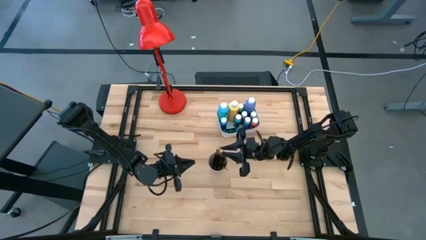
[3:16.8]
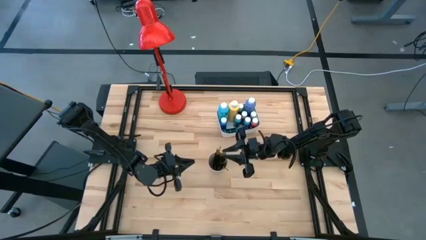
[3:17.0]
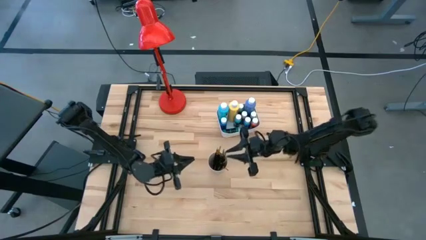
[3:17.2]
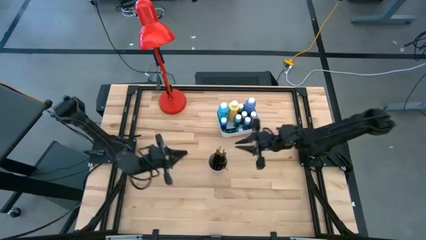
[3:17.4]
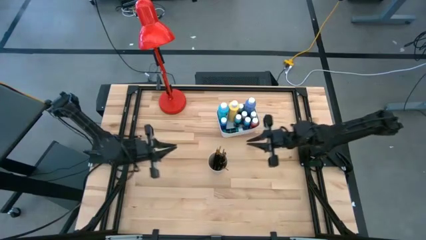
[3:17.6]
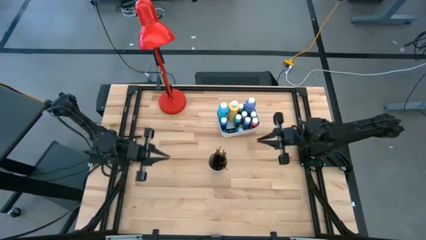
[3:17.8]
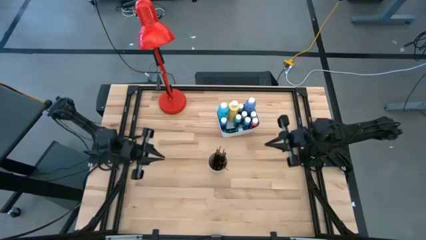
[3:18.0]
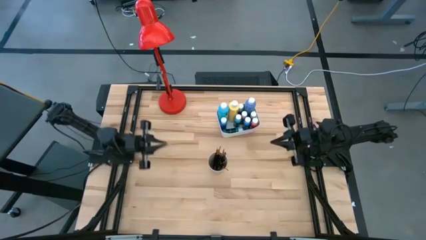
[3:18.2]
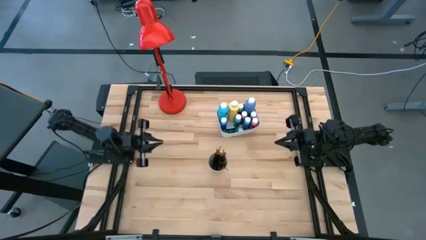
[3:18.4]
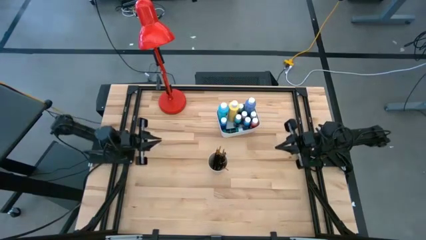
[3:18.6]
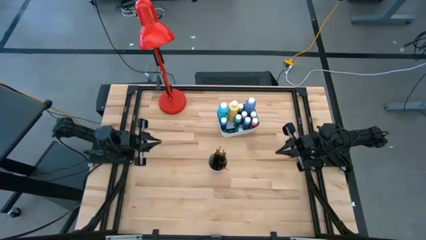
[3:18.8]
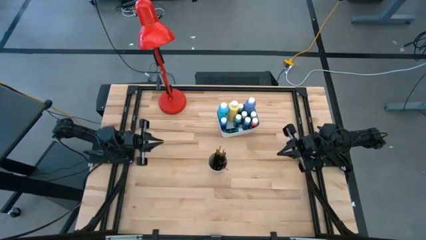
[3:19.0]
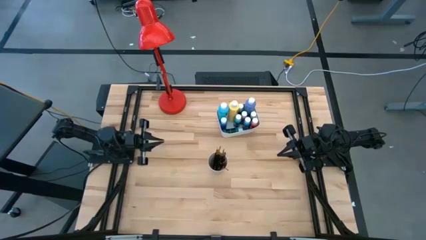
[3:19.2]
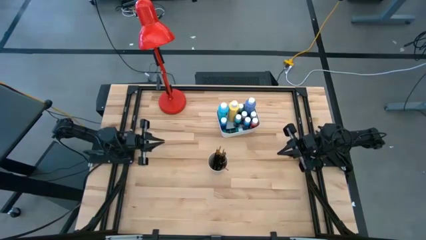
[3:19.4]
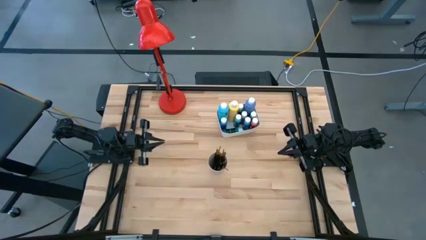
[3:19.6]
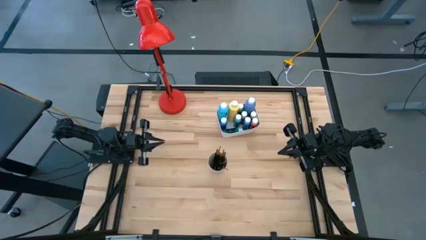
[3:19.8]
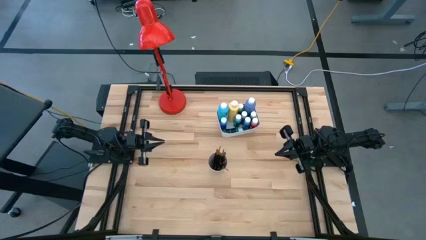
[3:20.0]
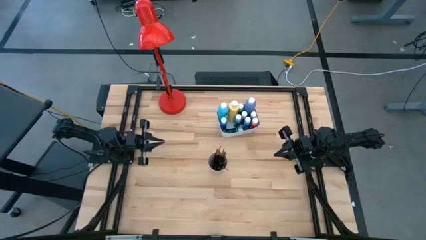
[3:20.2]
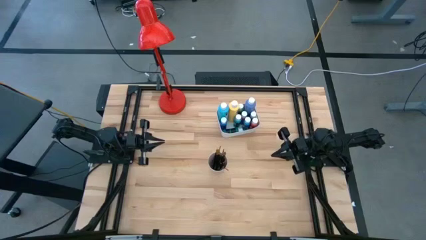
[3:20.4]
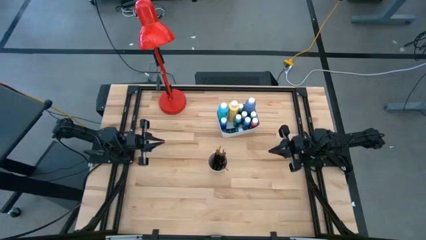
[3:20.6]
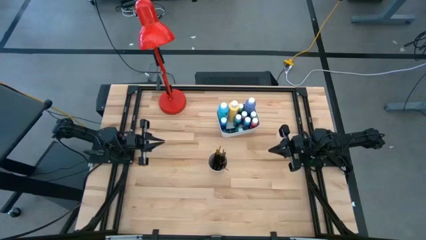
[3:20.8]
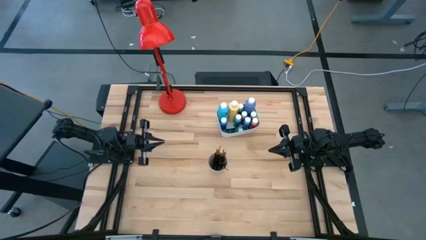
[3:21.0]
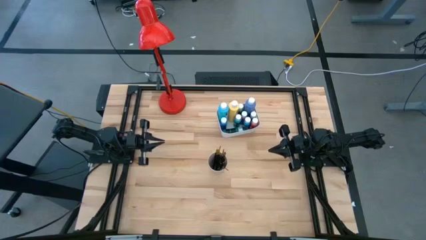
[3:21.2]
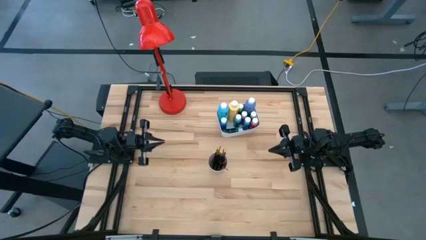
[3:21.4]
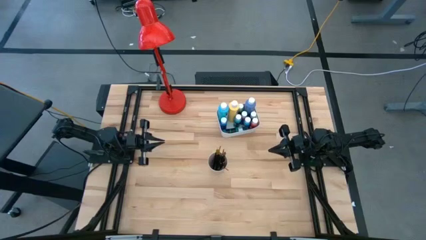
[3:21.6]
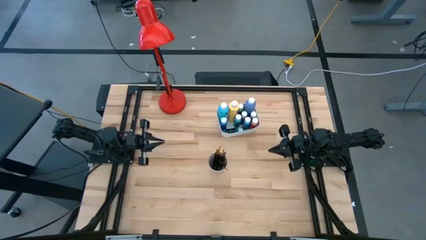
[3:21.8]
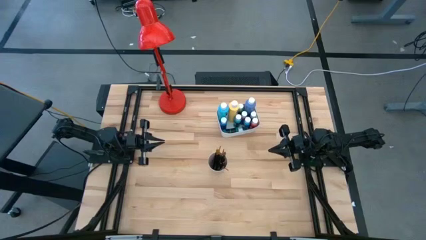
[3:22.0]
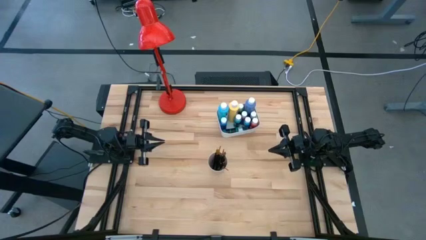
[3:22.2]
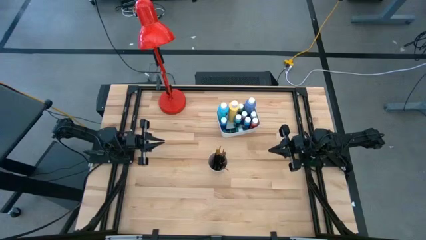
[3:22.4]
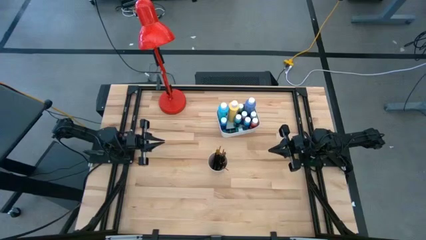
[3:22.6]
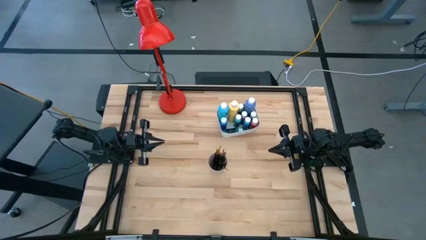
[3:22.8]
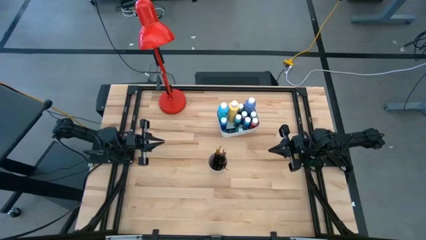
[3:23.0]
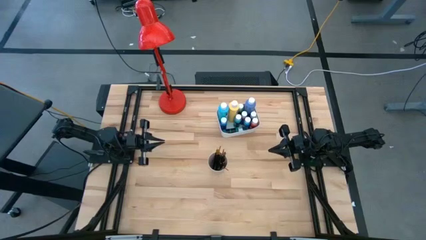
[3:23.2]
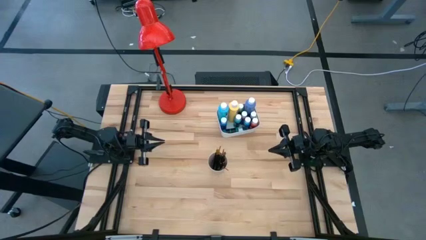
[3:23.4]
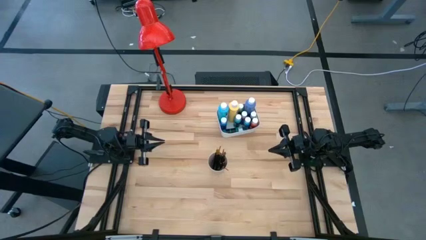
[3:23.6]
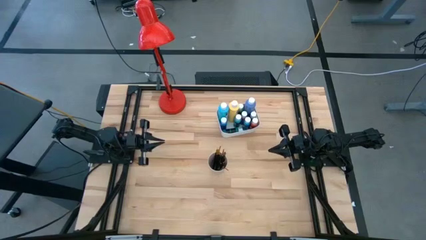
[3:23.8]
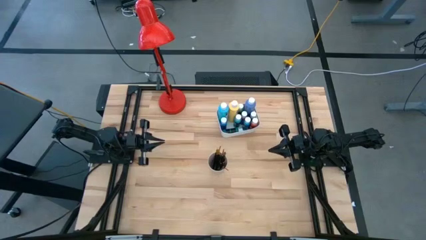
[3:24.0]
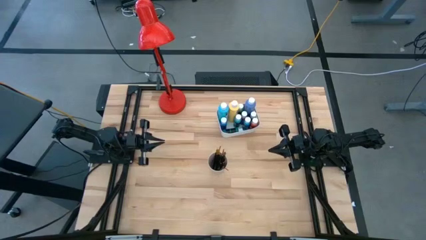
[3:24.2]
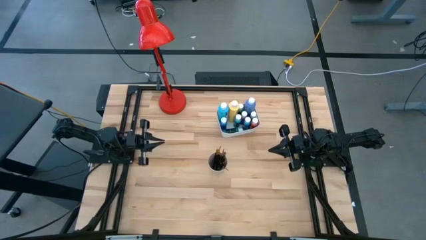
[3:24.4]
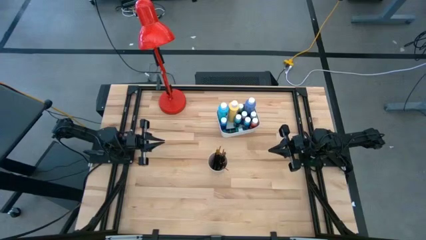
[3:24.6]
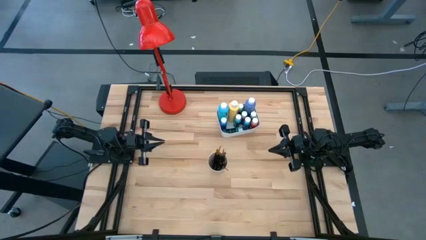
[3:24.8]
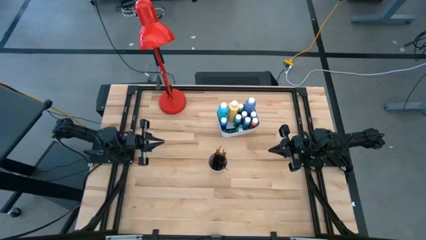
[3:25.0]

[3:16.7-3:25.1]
Task: Pick & Place Paint Supplies
Return to Home Position

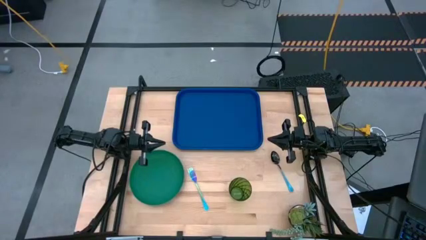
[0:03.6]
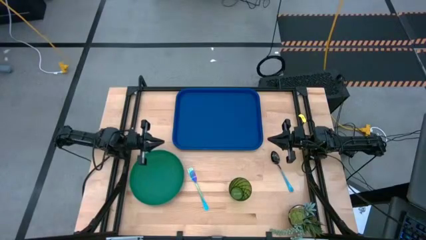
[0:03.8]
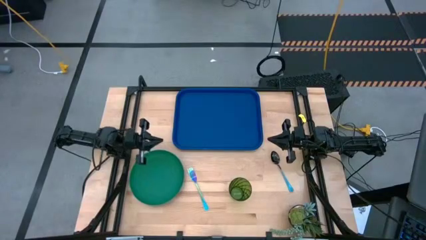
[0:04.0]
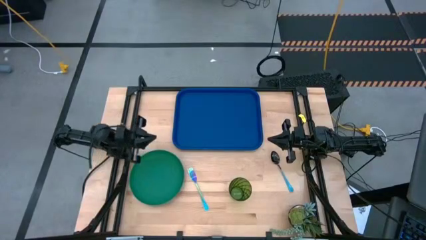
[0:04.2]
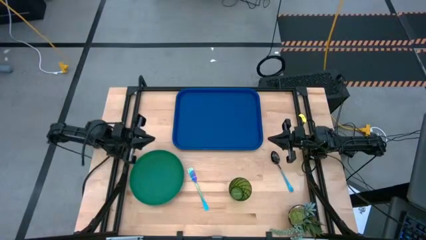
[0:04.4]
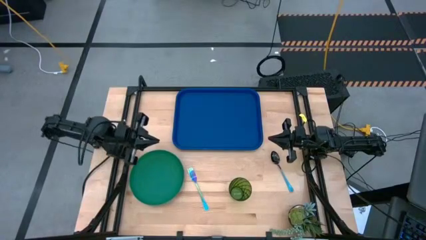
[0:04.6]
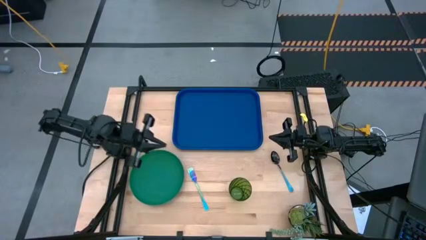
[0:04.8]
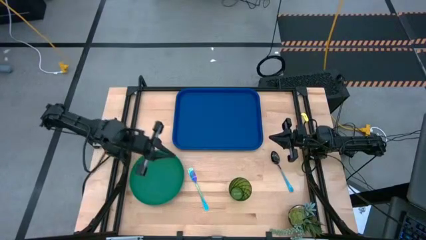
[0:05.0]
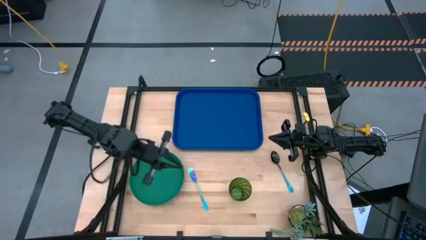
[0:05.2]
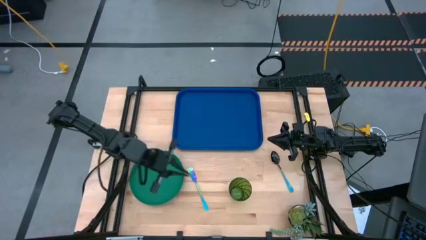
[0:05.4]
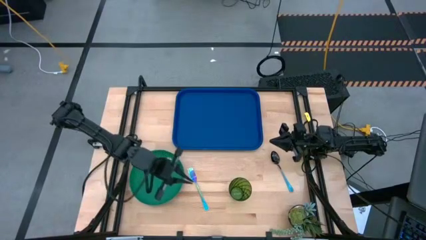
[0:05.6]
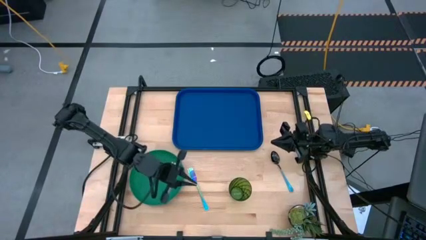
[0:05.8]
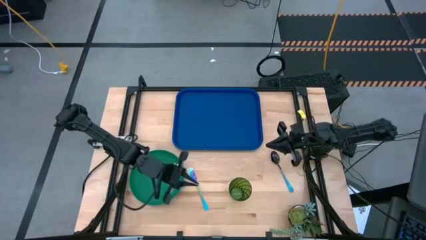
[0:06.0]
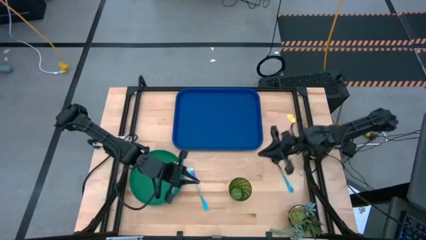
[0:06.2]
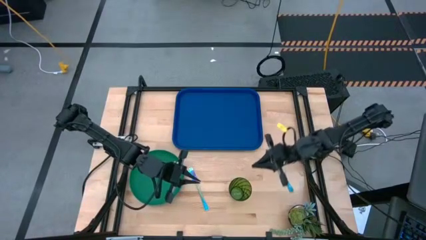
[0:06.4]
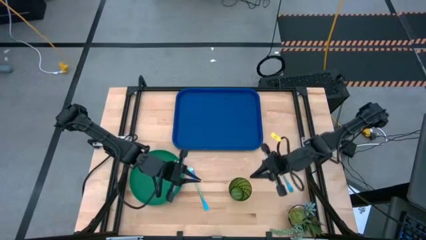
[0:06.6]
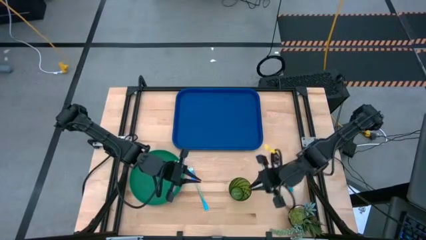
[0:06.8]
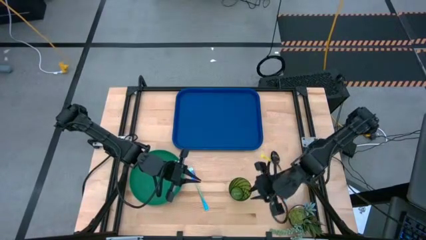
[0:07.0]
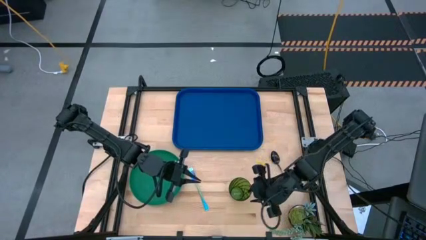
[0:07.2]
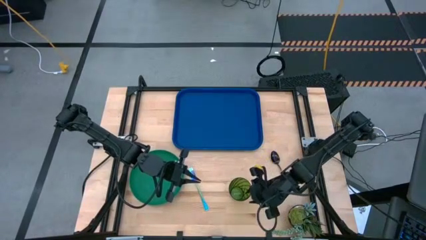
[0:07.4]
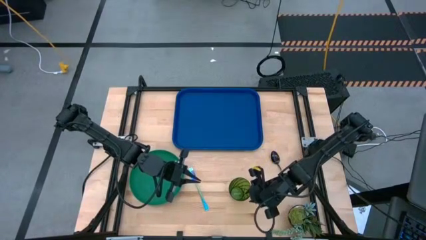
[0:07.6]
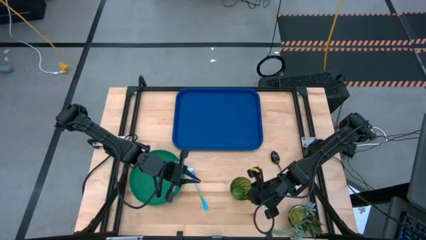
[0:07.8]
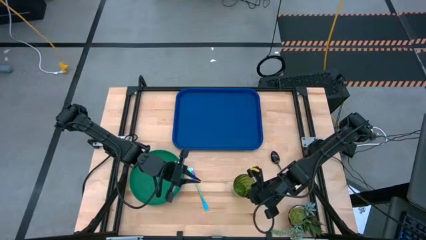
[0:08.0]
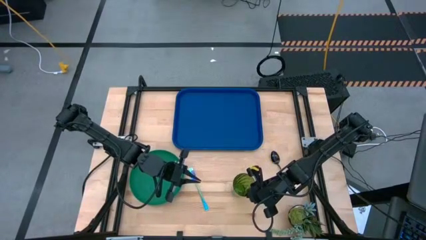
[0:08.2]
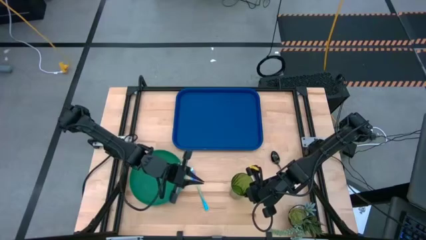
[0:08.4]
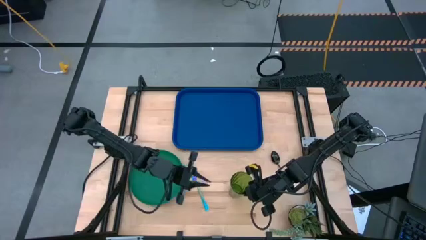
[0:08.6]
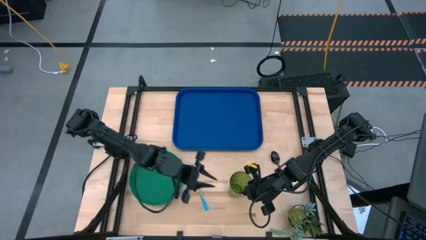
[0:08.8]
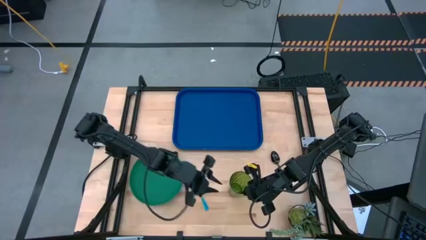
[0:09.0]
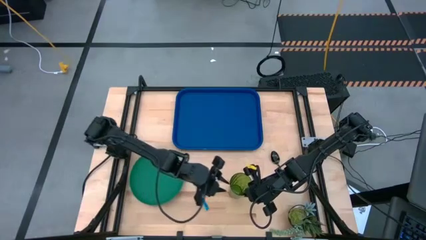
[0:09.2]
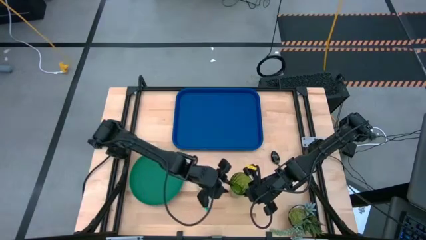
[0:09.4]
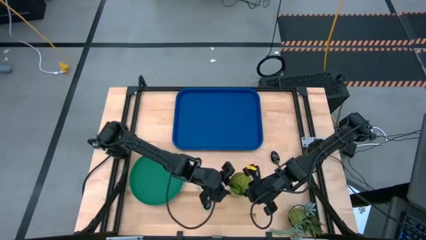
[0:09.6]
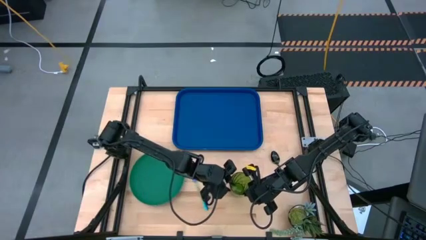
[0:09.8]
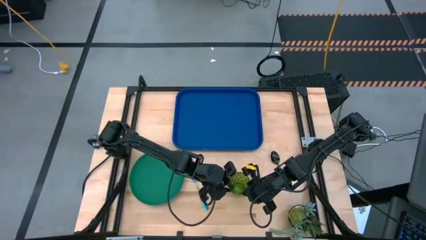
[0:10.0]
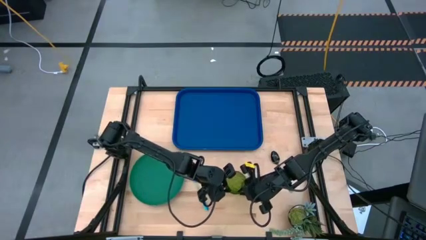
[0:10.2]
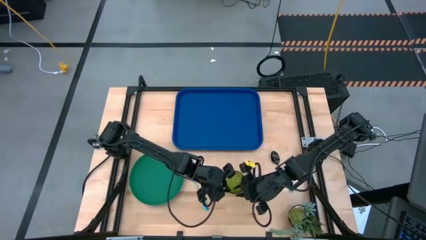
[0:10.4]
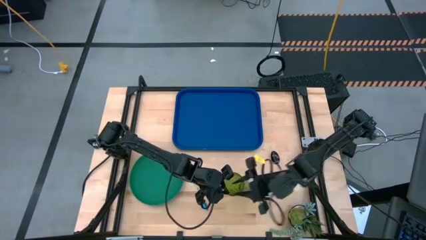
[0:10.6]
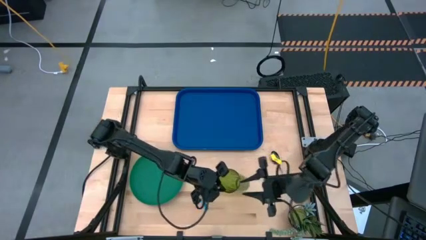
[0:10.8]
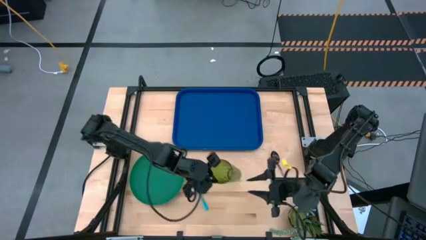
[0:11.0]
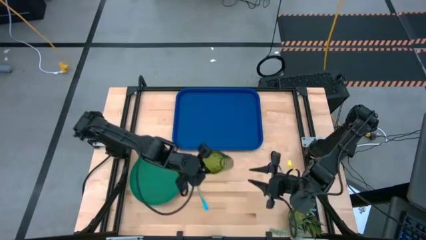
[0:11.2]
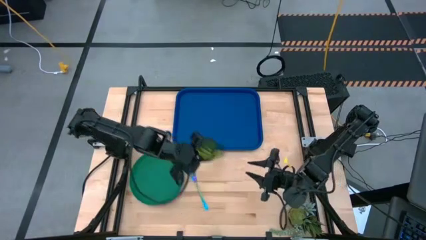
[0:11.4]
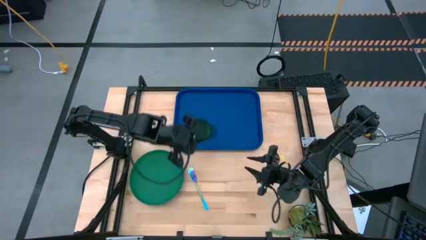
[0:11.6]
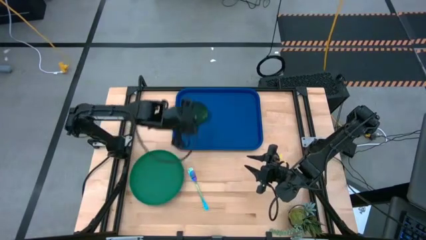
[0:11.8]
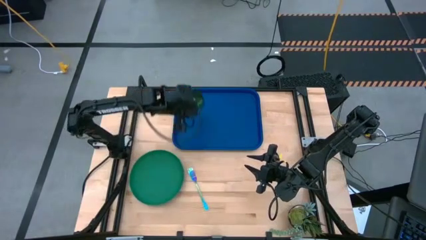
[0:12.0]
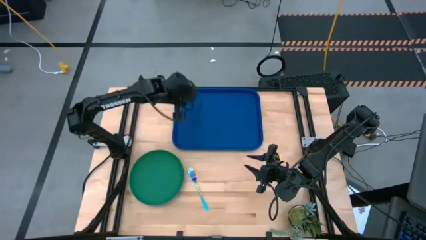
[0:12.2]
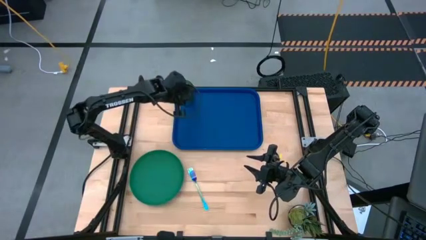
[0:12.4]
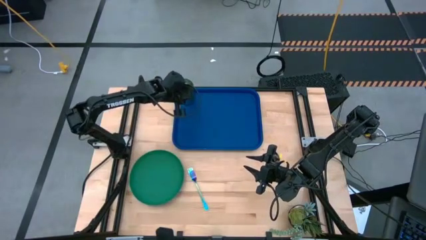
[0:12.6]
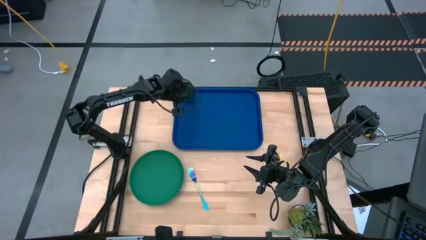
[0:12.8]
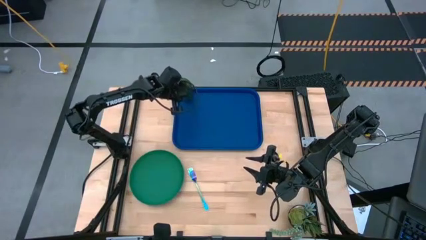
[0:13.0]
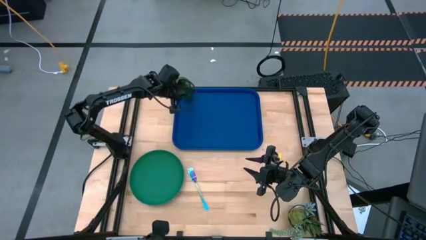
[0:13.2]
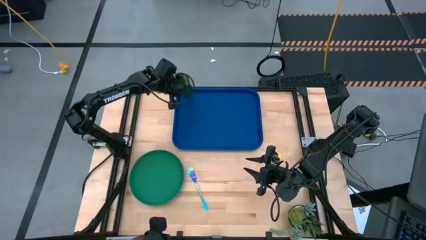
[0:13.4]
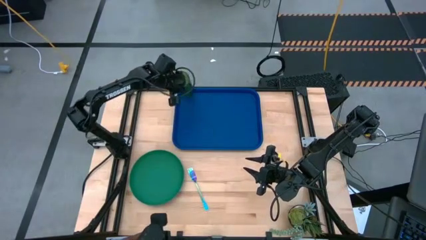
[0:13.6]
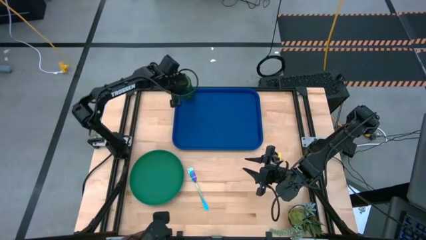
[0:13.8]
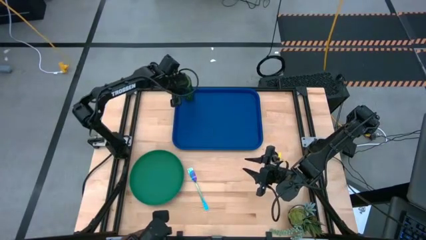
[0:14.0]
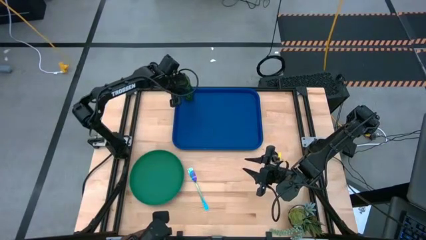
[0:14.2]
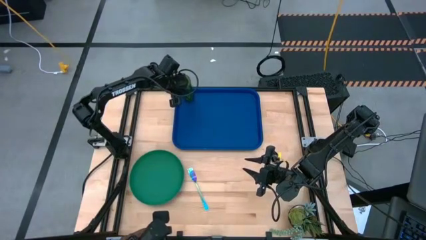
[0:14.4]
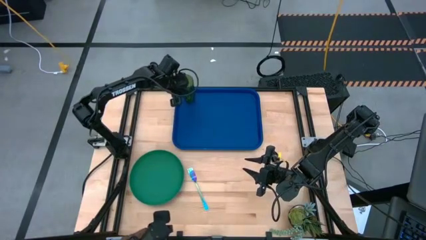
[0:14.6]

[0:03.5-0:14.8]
Task: Pick and place plate/cup/fork/spoon on tray
Put the green cup on the blue serving tray
